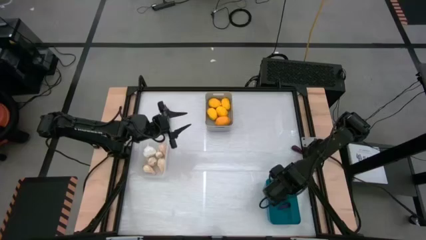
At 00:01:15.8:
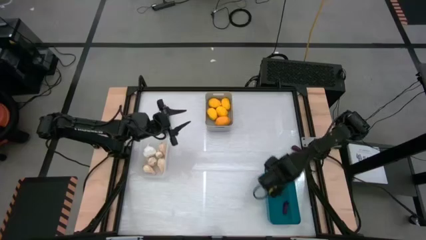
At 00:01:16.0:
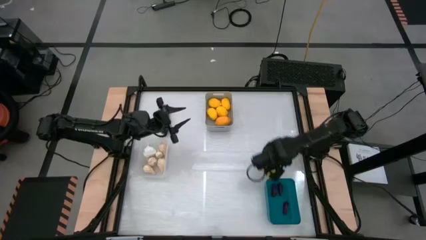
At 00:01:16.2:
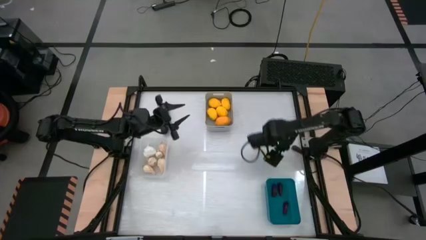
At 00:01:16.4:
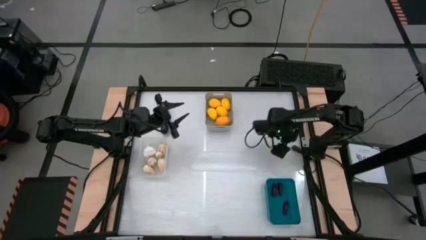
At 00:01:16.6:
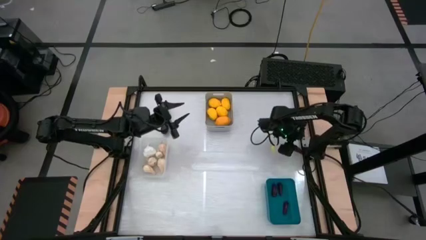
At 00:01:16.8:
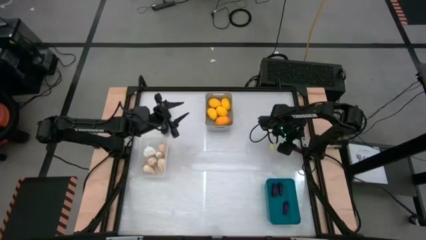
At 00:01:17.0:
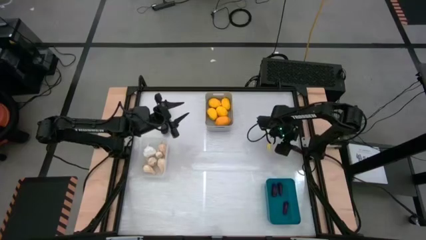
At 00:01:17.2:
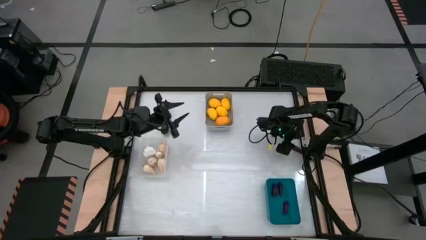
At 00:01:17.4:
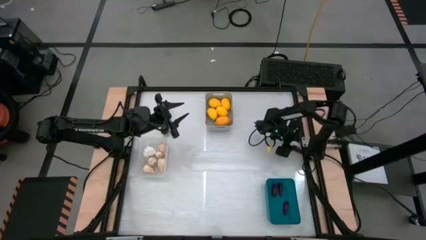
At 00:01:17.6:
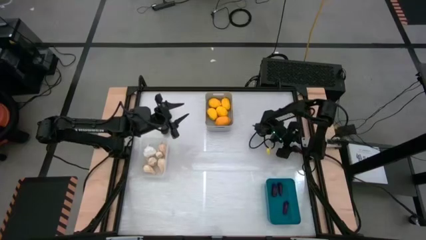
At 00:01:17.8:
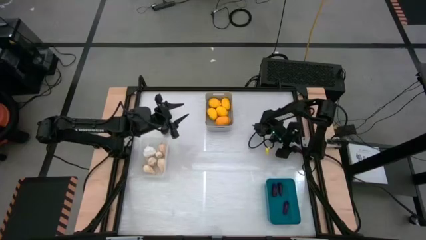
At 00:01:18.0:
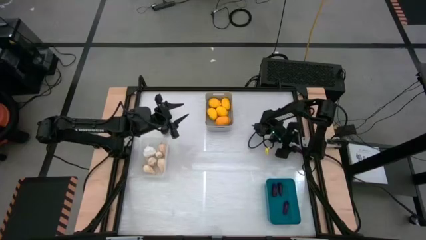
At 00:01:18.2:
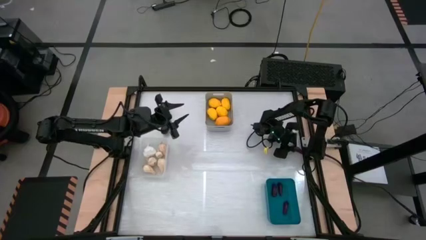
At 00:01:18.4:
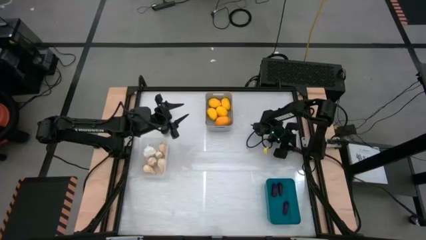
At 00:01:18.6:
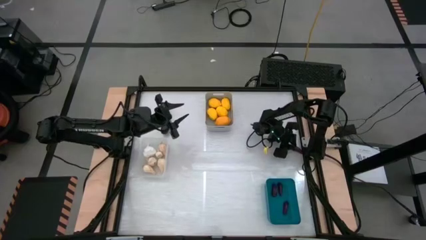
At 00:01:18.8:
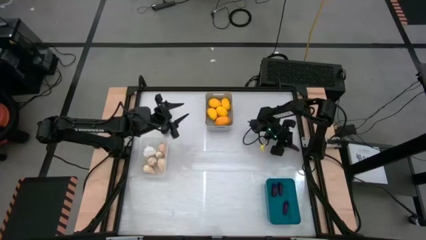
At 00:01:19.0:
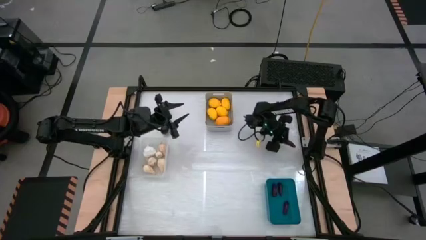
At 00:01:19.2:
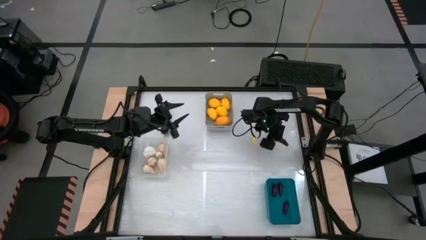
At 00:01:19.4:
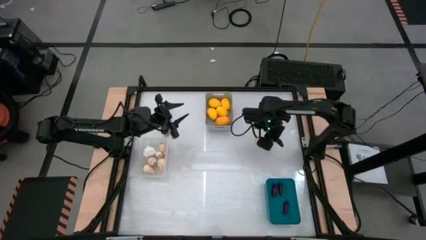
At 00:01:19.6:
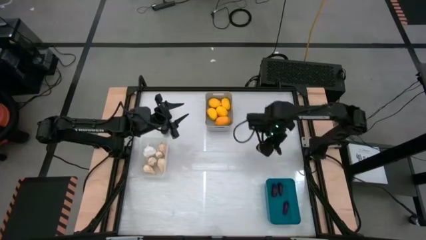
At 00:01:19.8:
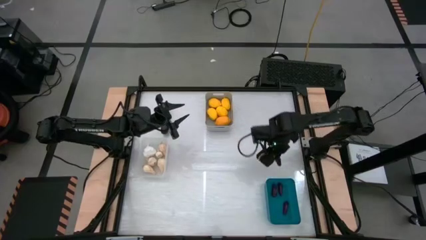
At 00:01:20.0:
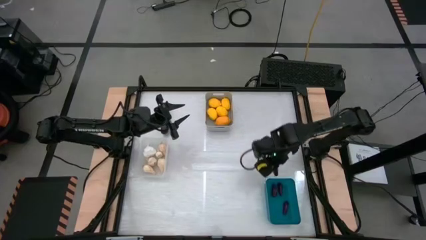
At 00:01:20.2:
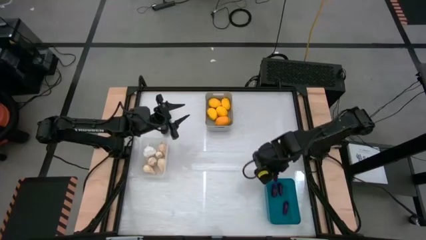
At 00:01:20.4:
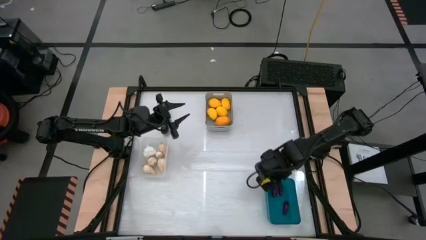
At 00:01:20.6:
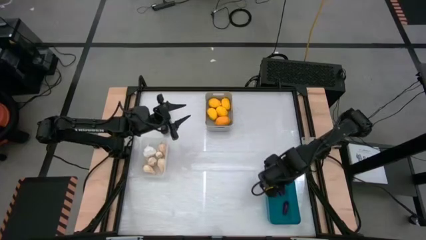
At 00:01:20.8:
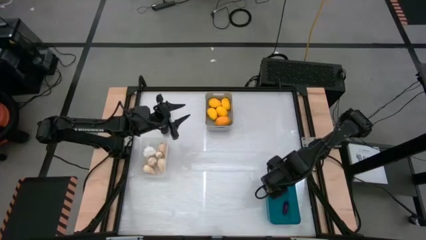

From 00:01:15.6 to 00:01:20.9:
Task: Sort produce into baskets
Put the eggplant into the blue bin

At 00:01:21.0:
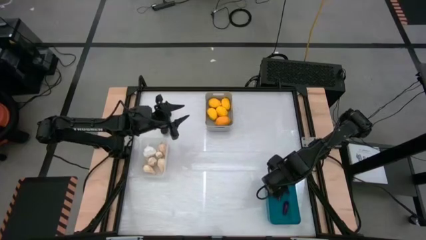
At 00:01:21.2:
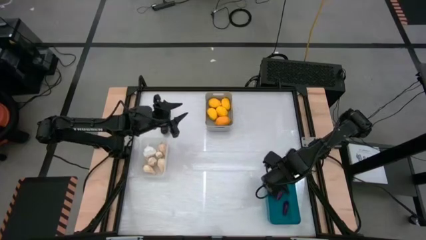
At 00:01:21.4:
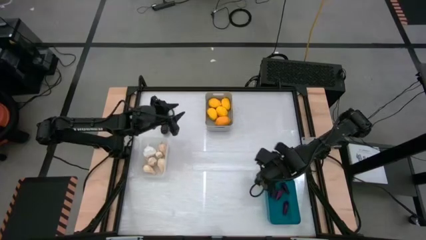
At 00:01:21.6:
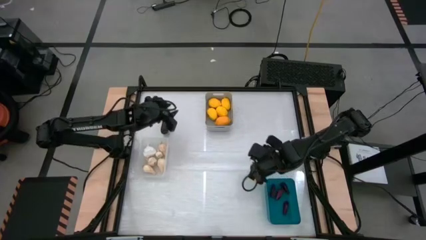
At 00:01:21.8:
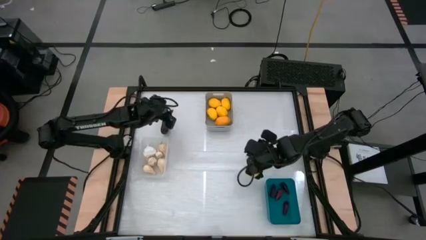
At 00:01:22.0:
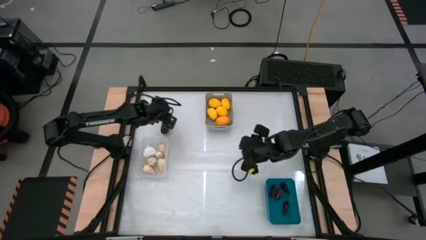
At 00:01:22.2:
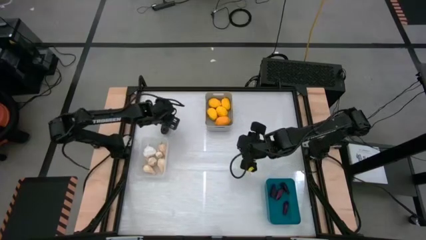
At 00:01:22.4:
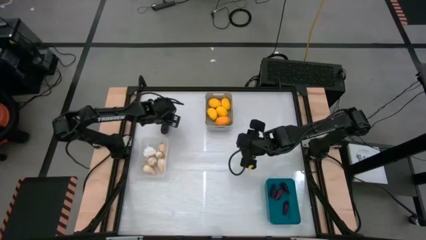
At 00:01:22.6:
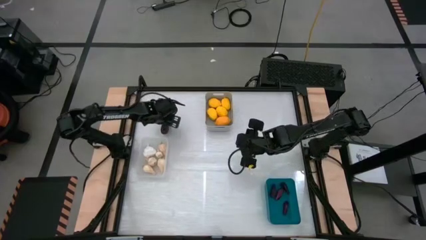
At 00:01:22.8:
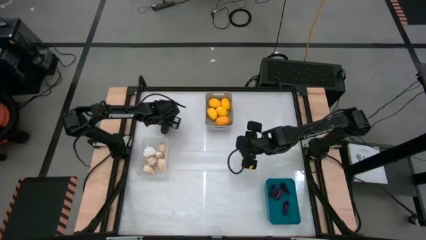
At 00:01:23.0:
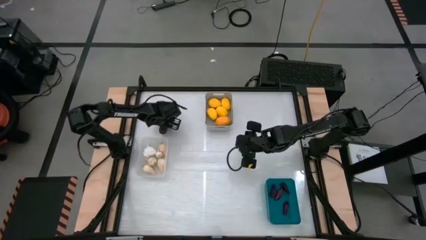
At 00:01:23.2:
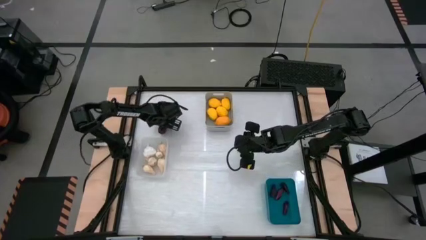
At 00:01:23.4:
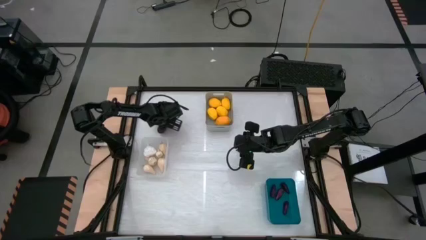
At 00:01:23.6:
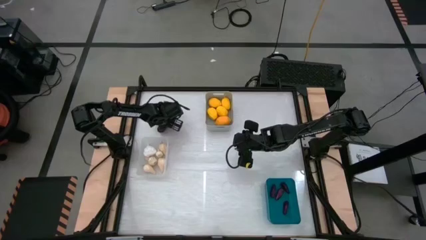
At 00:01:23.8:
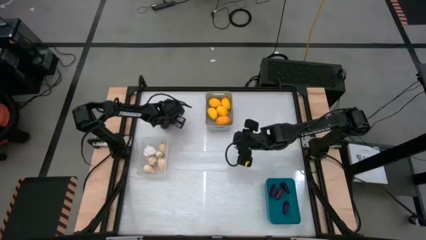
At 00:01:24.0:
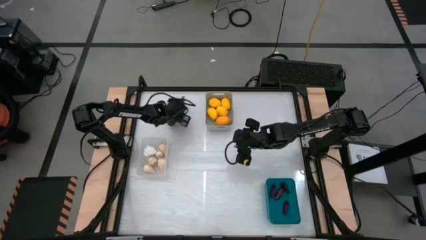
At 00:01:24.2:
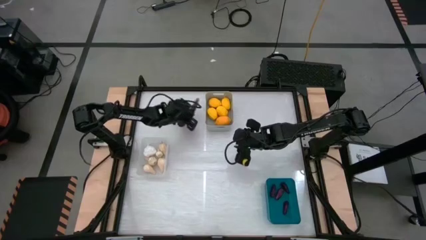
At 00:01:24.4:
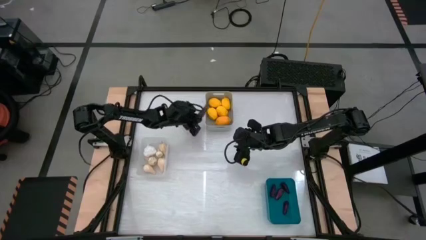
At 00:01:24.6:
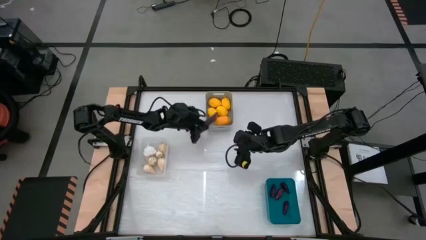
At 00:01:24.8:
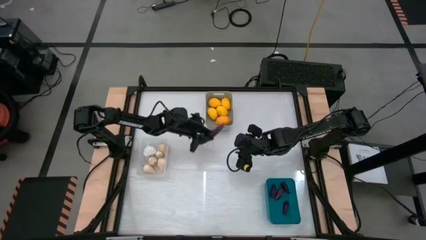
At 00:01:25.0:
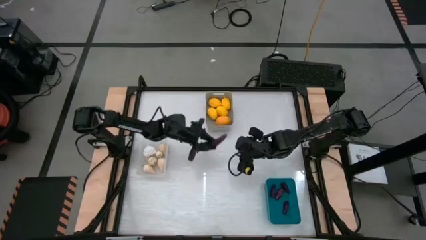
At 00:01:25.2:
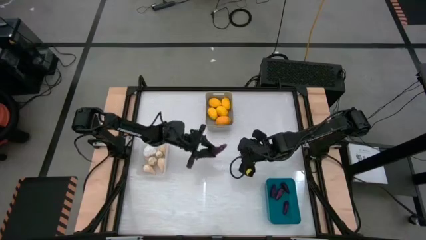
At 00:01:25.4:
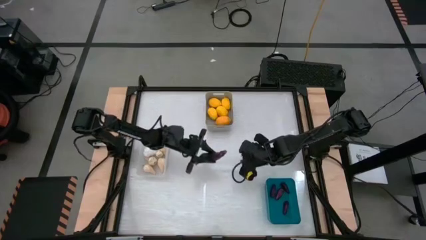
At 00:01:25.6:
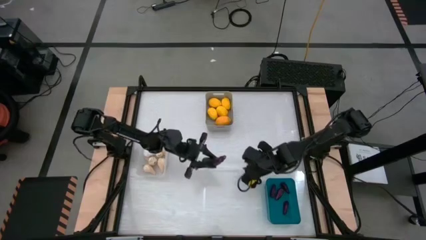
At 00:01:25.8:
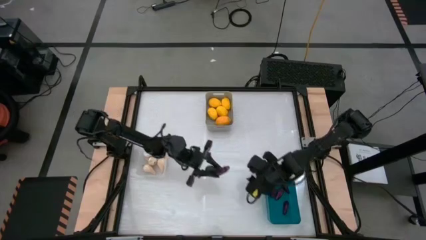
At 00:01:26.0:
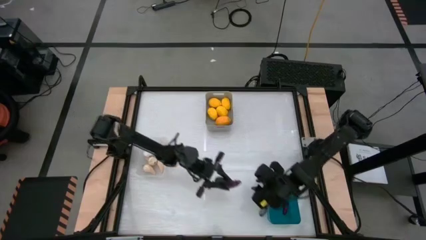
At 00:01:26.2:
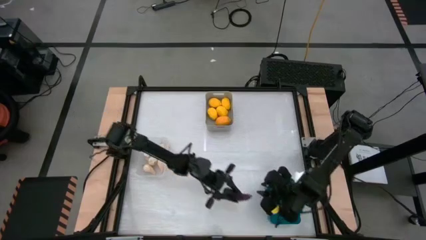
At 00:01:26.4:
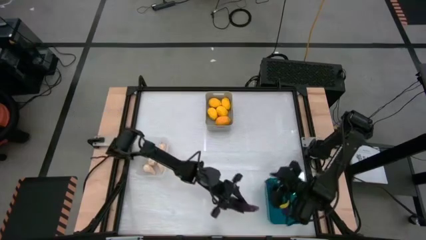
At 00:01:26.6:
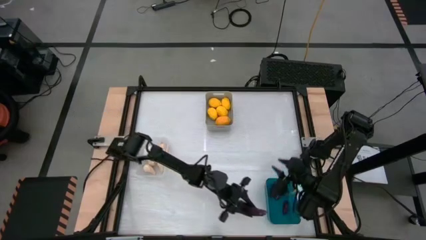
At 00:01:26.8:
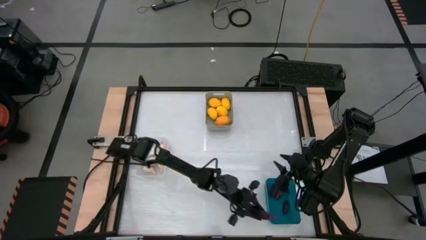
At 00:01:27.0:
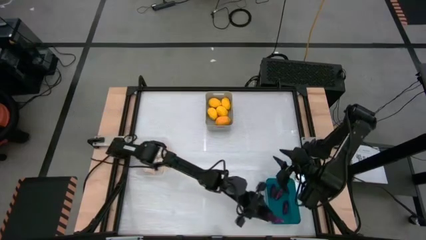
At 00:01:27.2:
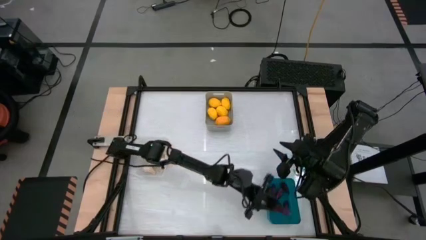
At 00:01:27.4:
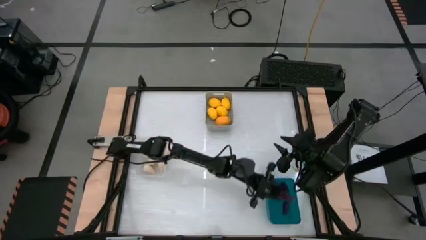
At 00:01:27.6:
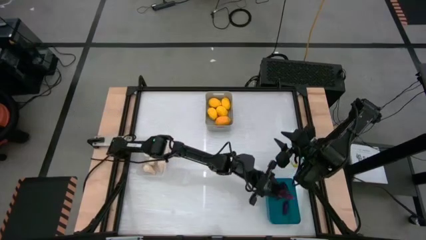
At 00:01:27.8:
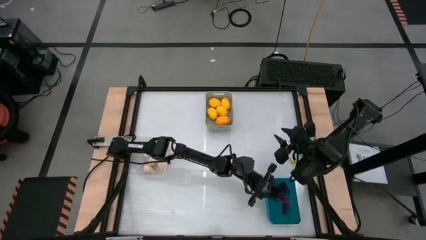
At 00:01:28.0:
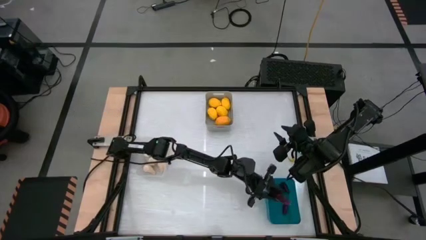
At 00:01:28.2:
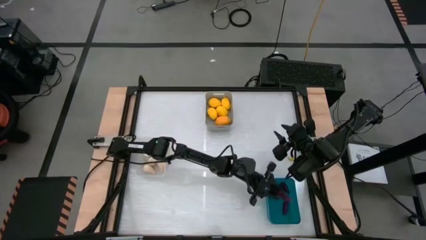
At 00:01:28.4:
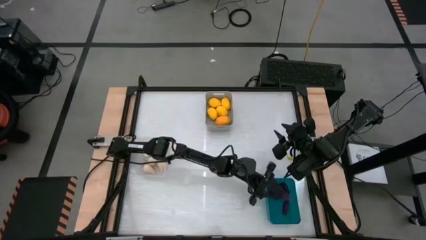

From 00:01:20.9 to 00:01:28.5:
Put the eggplant into the blue bin

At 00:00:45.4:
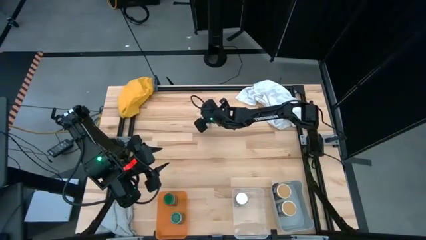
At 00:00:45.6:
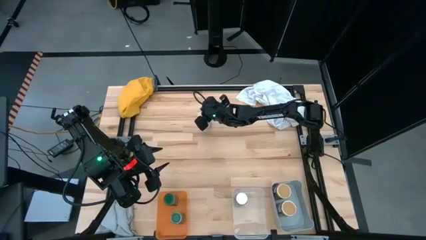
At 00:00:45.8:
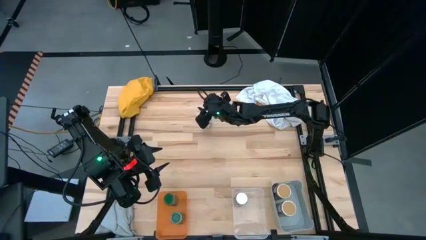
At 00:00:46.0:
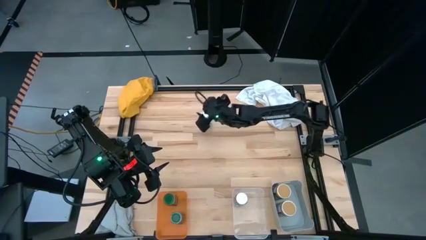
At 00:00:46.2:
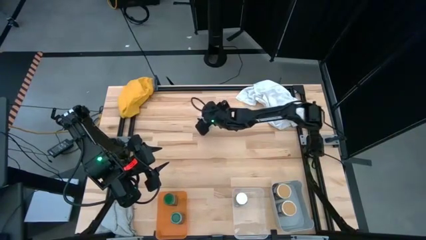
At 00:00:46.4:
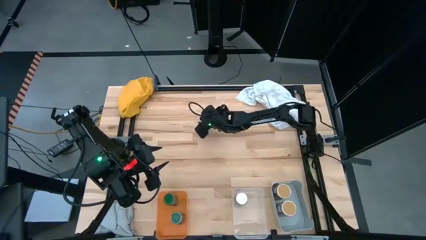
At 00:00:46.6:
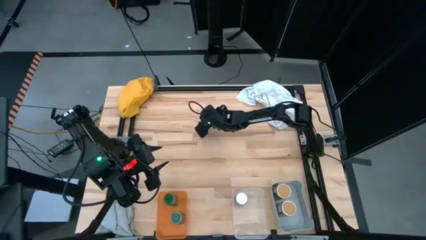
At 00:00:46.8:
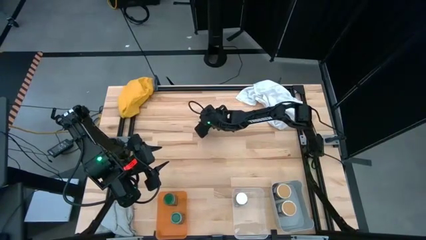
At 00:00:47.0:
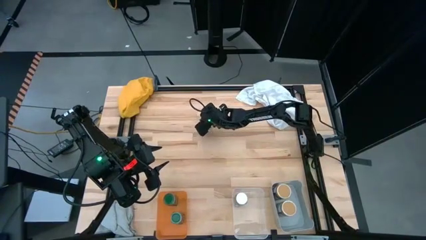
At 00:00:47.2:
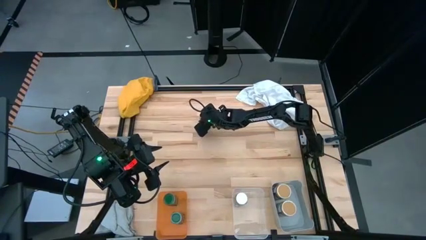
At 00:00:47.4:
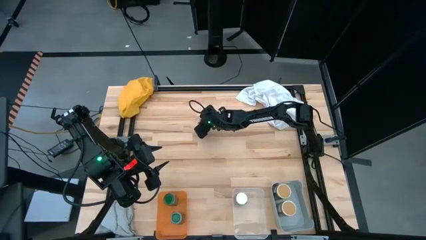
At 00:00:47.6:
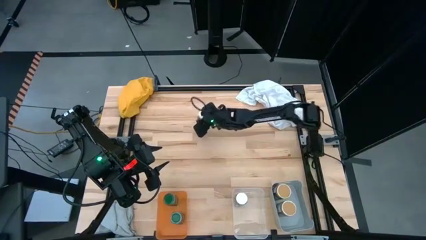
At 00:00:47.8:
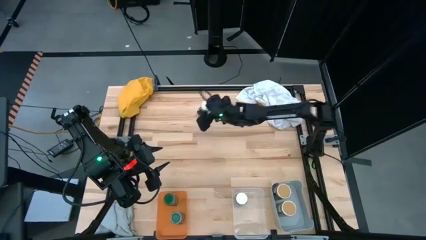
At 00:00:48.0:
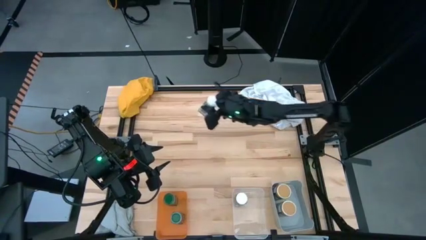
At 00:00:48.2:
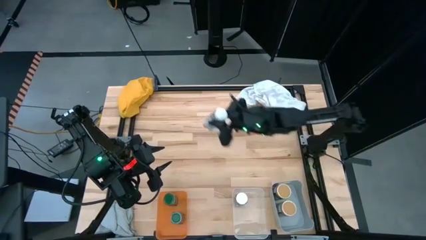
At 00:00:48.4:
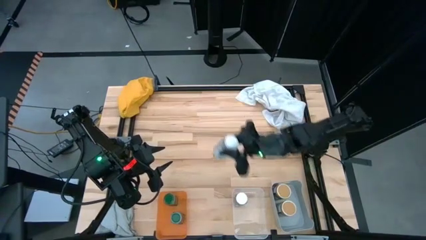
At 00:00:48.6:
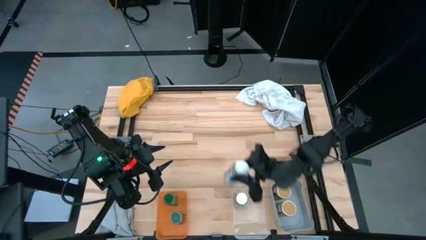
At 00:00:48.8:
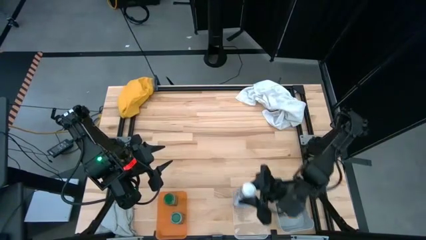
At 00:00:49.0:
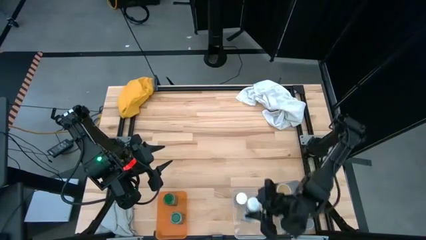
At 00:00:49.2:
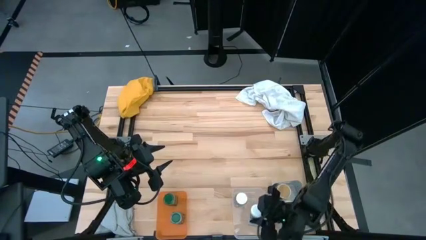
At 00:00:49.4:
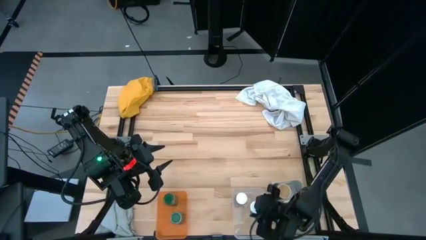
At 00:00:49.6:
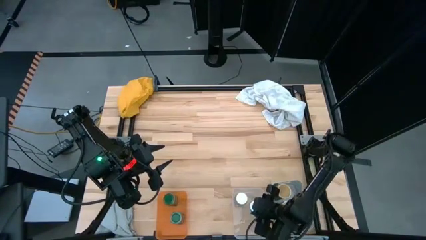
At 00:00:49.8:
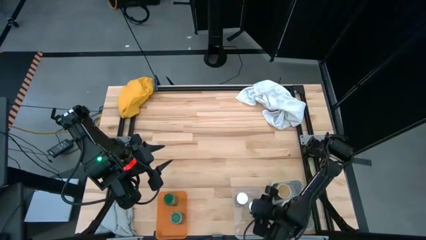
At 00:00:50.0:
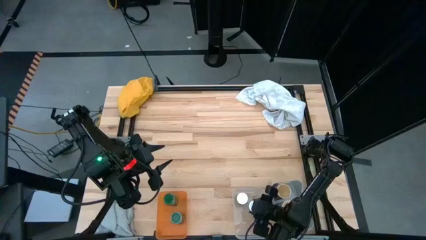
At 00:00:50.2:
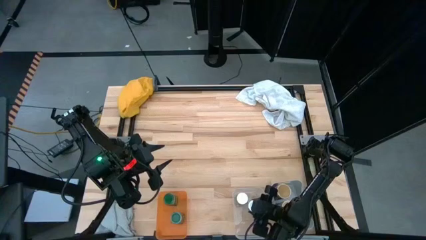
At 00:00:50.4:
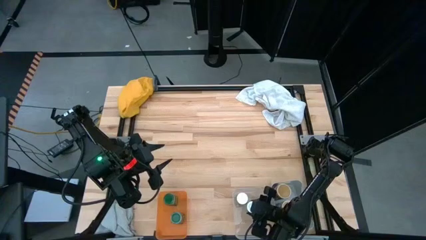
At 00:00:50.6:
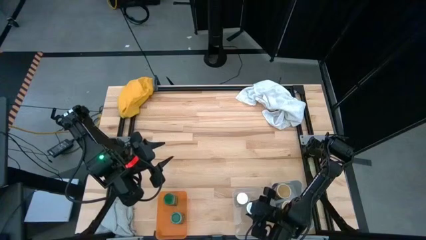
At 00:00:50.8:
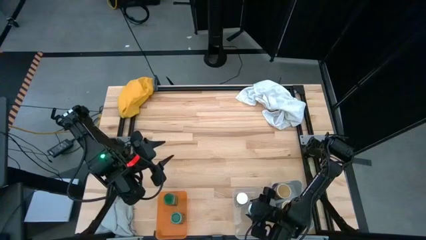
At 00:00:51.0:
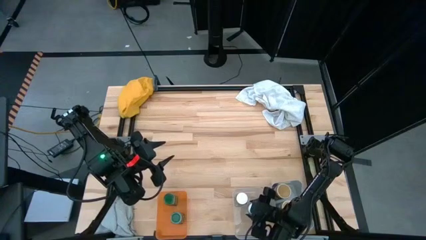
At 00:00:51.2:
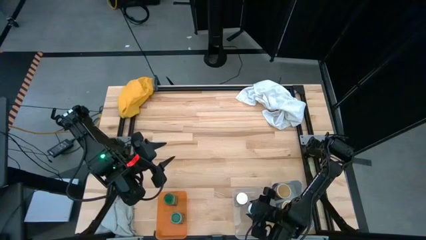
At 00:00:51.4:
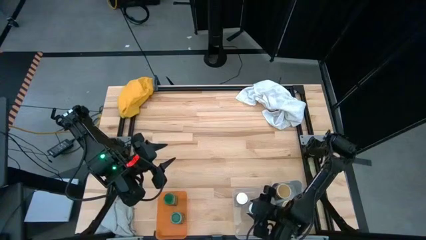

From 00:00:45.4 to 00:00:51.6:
Task: Sort spices by type
Put the white spice bottle into the transparent bin
